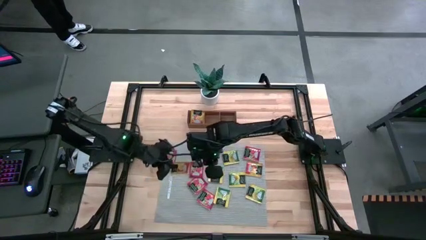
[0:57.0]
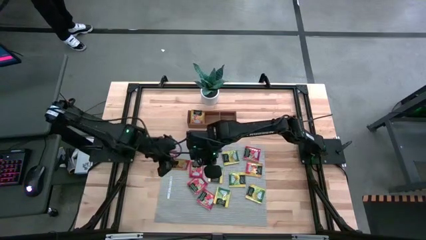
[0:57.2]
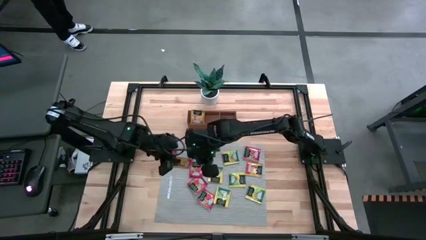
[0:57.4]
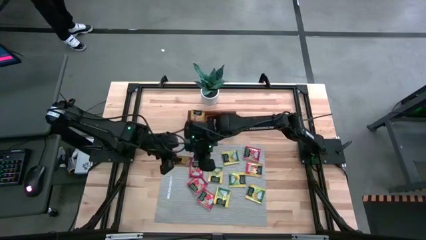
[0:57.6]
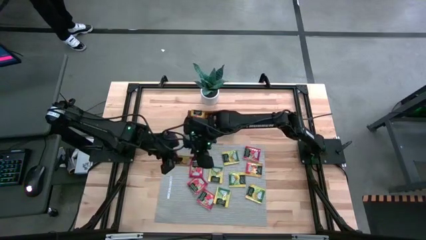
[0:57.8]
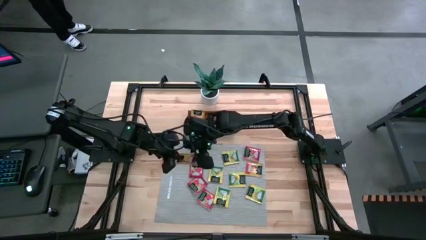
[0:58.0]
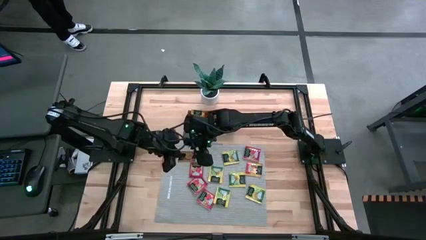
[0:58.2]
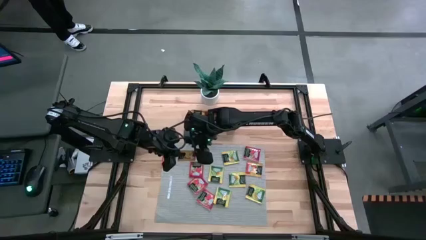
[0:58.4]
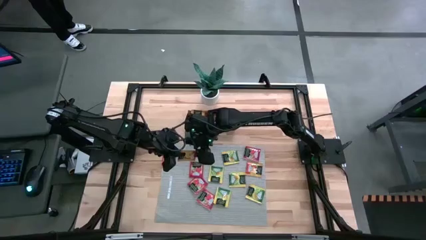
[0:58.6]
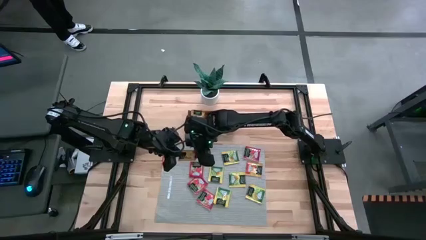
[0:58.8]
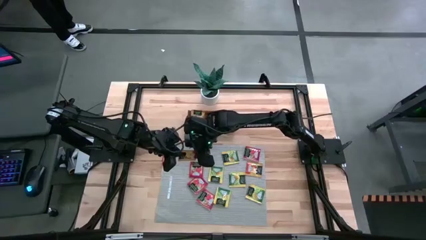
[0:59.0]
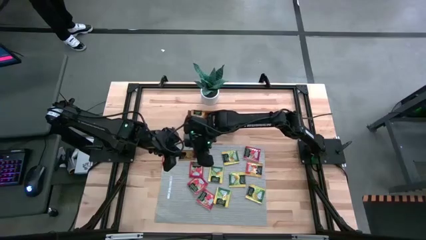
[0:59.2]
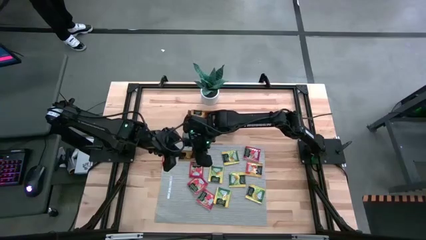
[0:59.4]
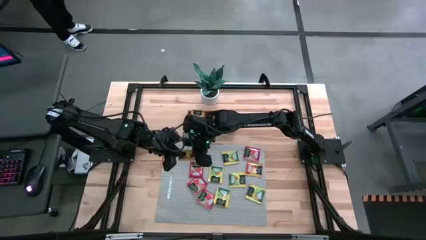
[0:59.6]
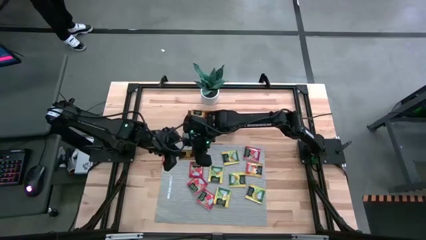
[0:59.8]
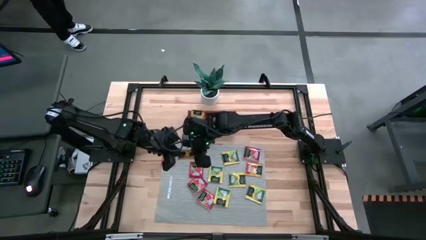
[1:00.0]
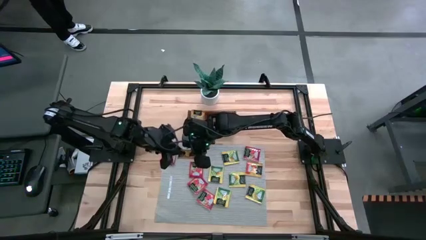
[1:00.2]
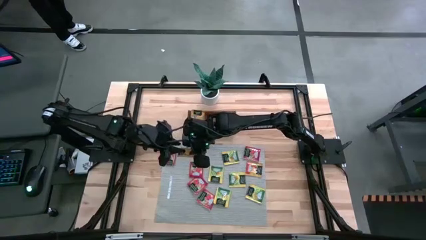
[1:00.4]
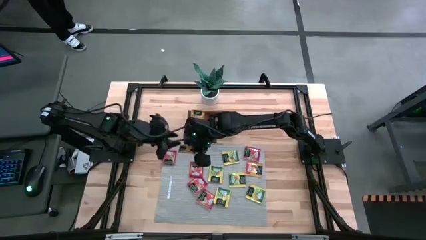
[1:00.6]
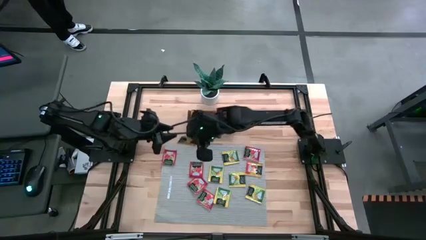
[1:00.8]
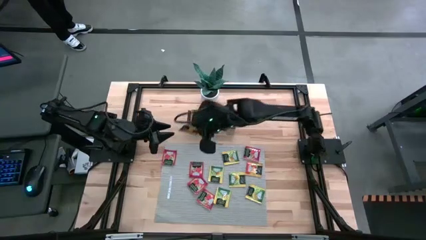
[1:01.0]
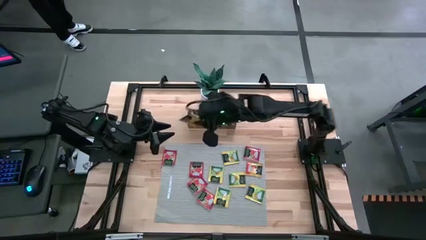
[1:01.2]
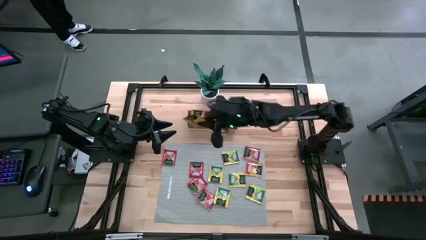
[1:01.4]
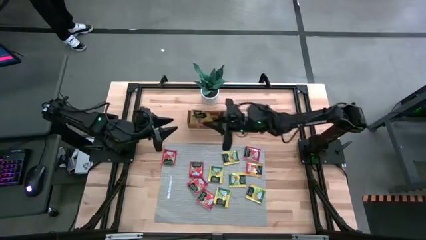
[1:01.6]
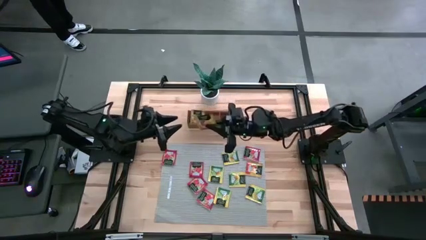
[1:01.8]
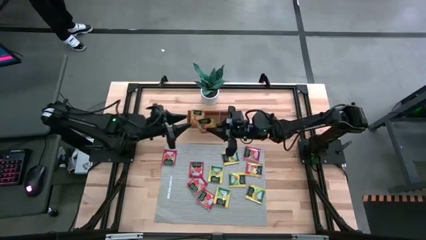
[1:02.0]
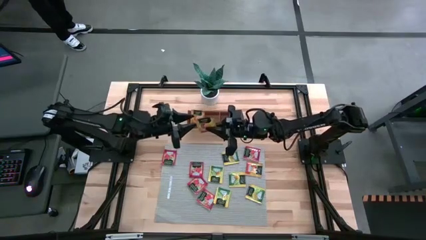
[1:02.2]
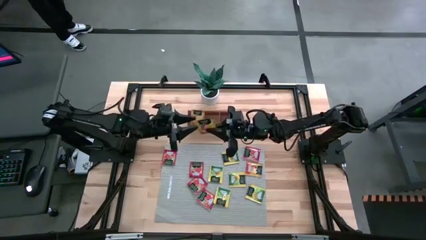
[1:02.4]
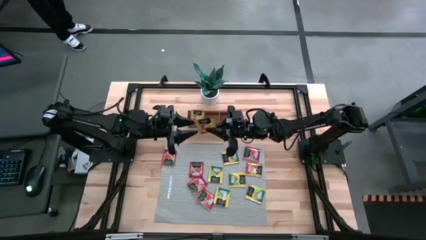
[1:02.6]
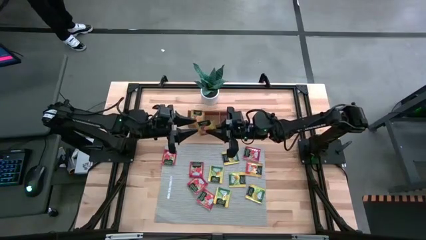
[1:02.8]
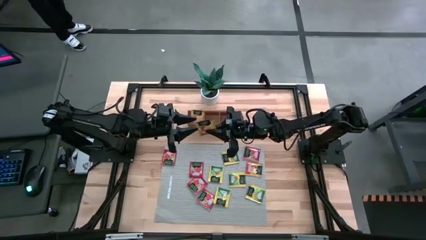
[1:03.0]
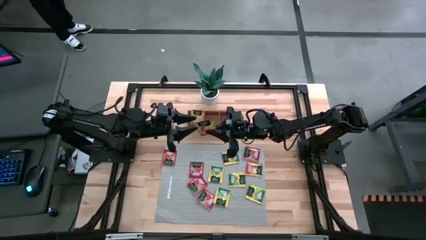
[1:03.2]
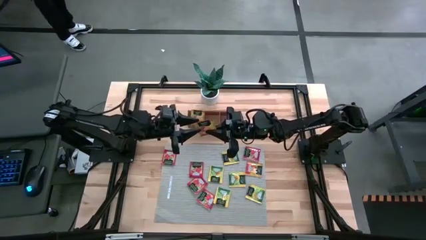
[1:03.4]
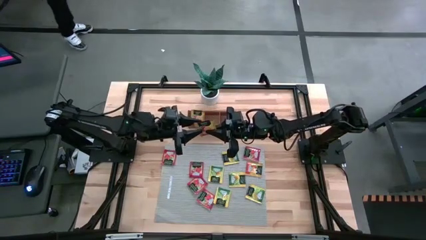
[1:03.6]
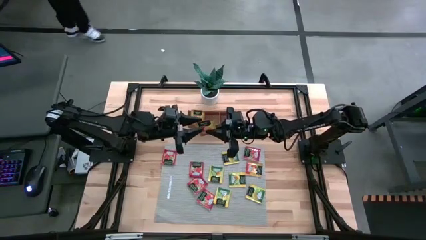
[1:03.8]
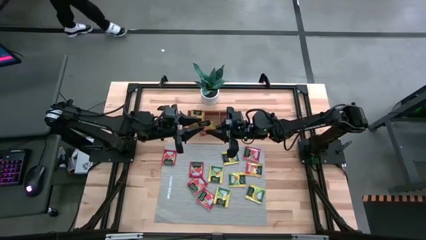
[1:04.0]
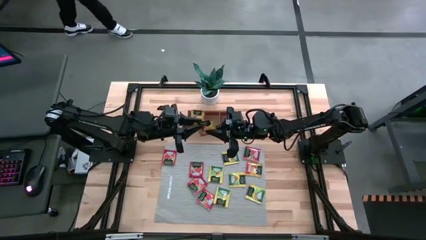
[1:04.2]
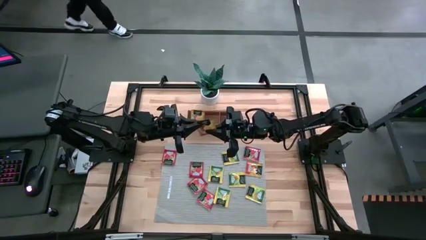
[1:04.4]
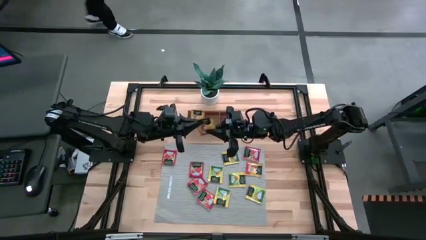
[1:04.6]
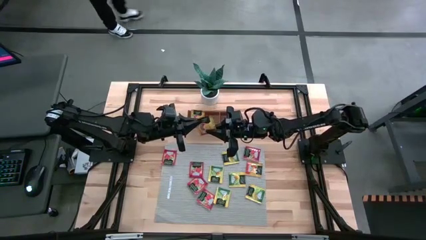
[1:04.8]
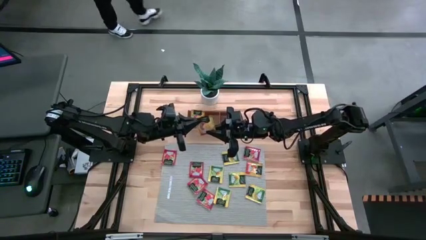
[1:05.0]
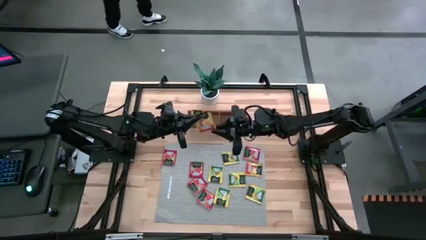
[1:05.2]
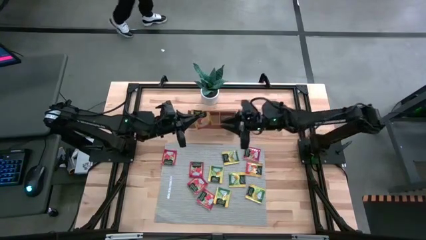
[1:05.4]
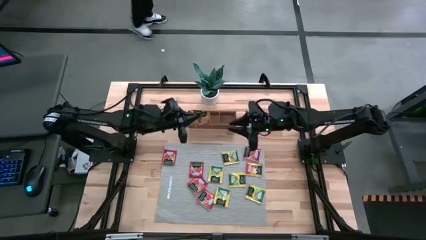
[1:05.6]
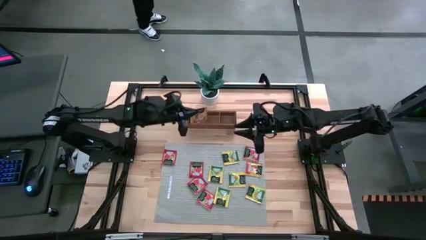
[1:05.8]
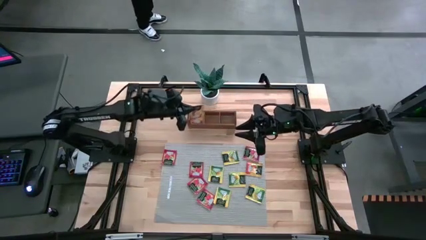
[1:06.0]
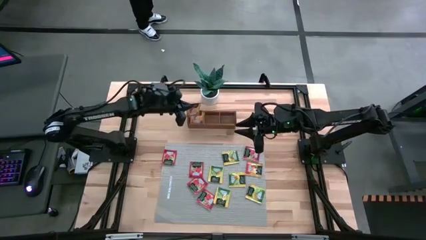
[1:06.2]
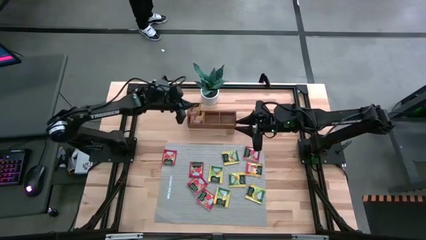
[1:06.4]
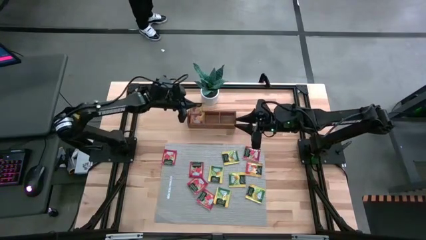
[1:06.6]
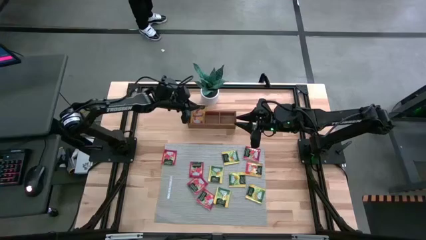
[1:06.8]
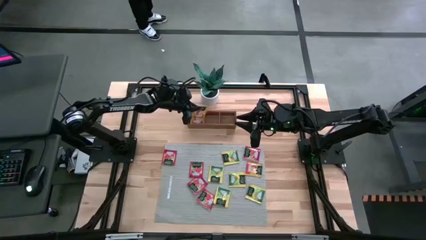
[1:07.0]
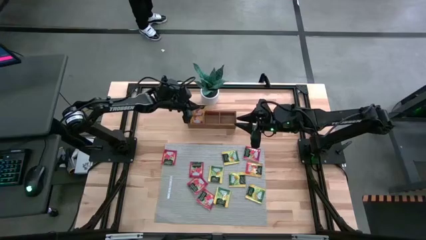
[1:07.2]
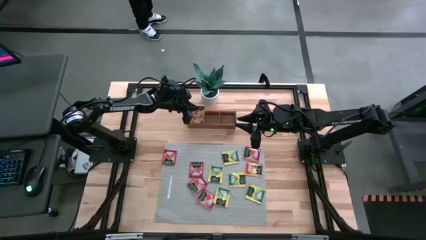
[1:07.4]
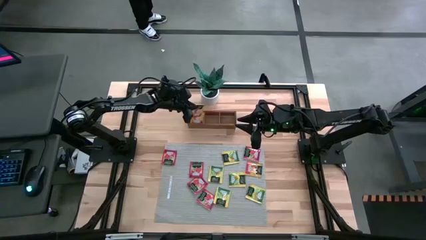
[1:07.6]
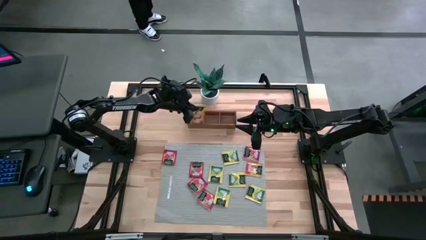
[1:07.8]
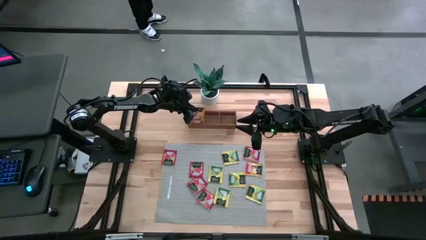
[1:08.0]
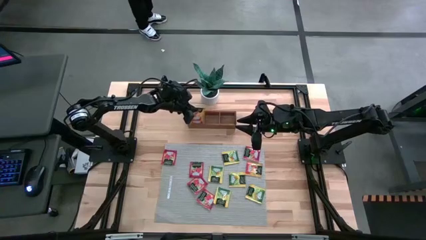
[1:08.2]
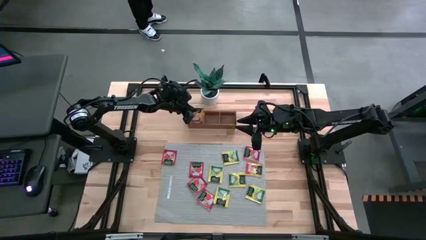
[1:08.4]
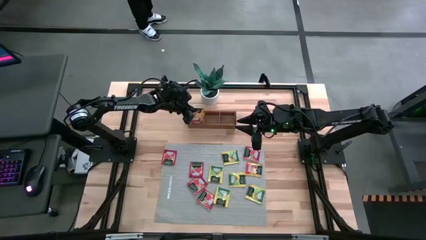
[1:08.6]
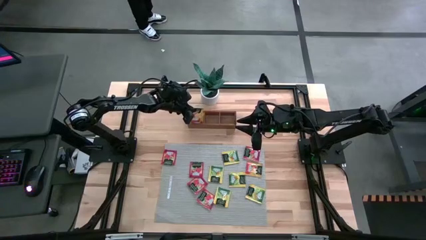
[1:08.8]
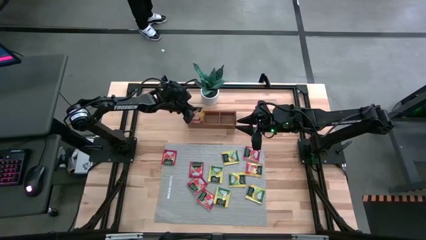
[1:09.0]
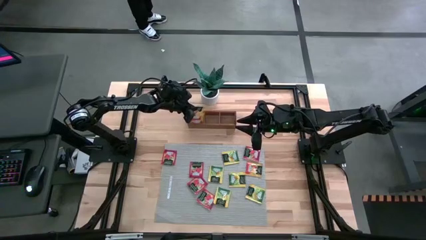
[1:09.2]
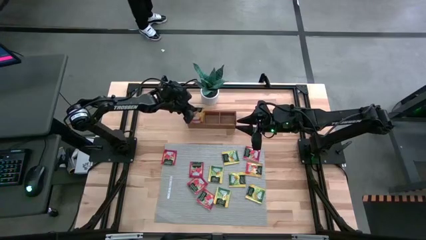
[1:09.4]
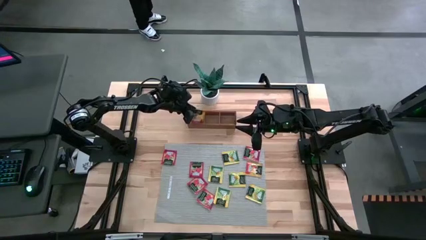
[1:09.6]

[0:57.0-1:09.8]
Task: Pick & Place Tea
Put the orange tea bag into the left section of the wooden organizer
